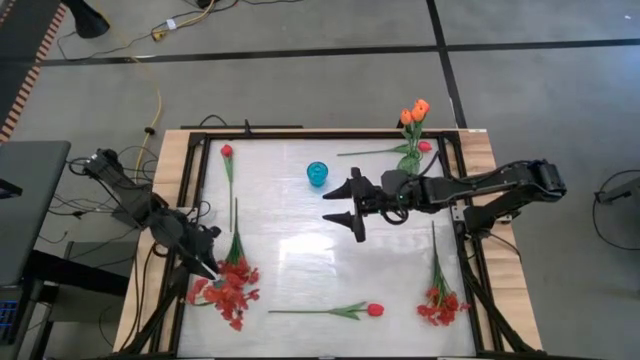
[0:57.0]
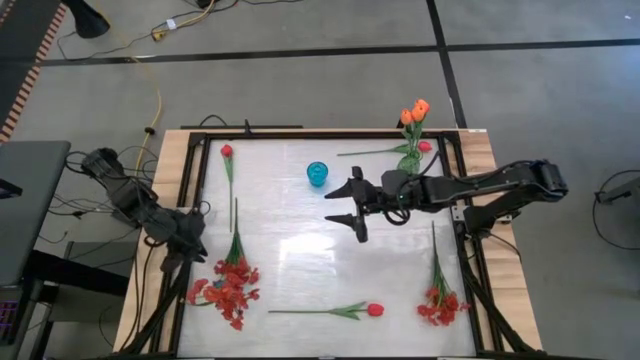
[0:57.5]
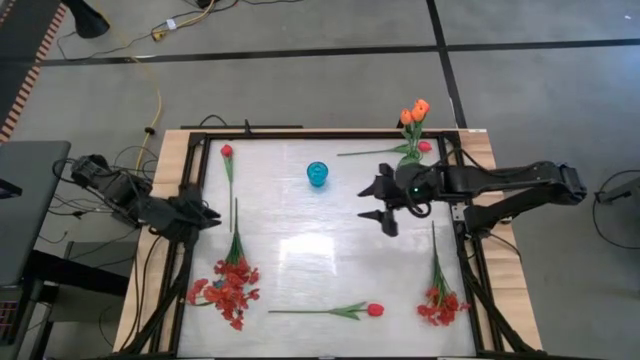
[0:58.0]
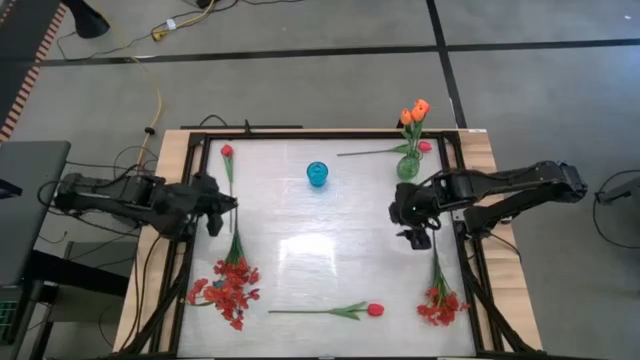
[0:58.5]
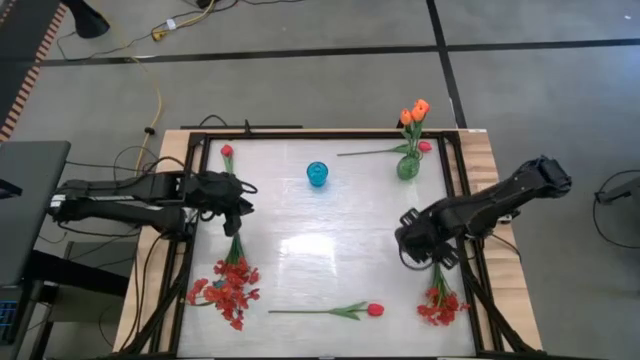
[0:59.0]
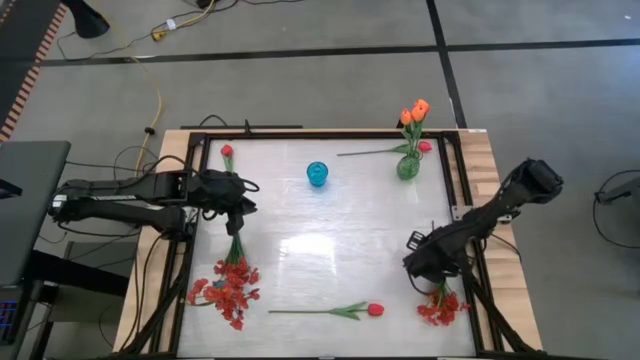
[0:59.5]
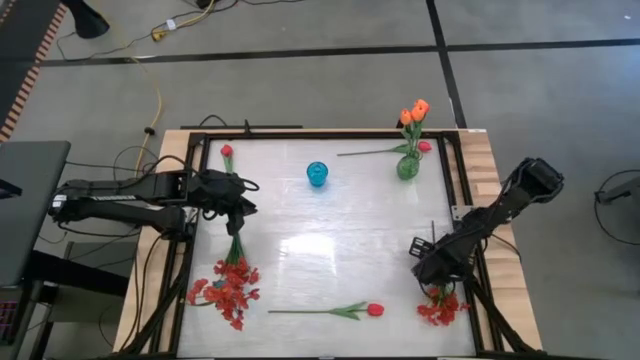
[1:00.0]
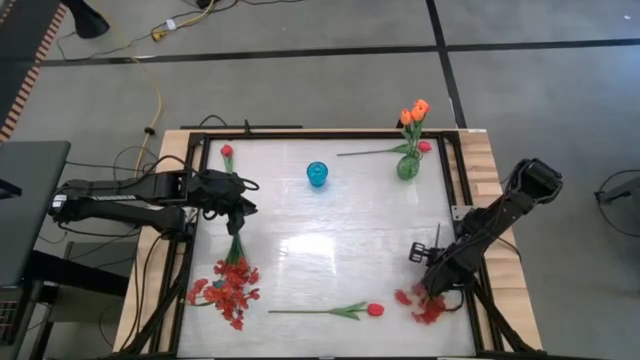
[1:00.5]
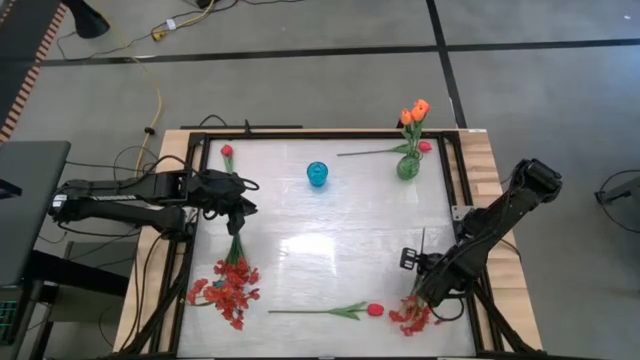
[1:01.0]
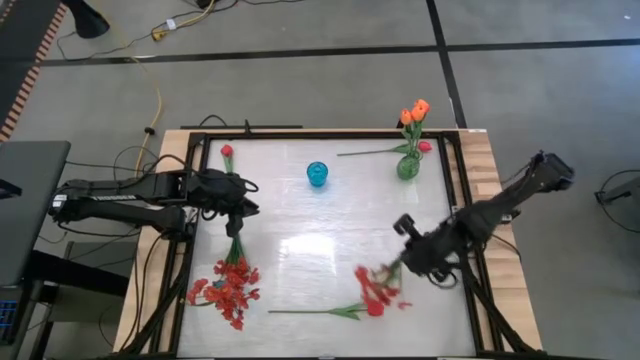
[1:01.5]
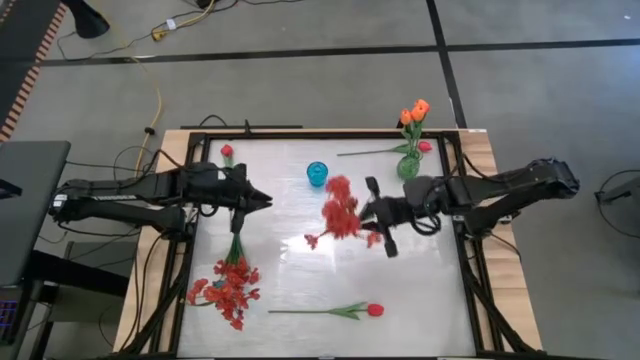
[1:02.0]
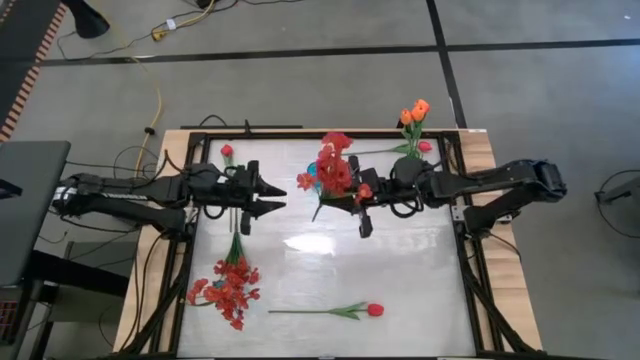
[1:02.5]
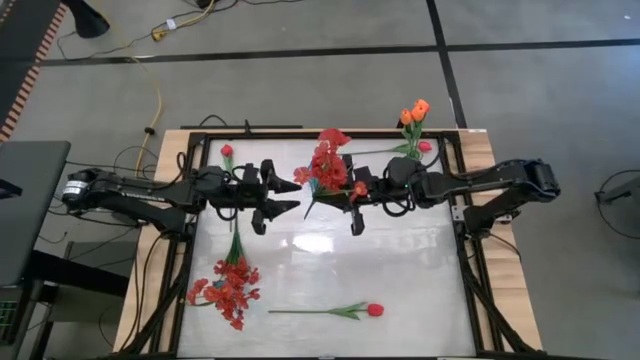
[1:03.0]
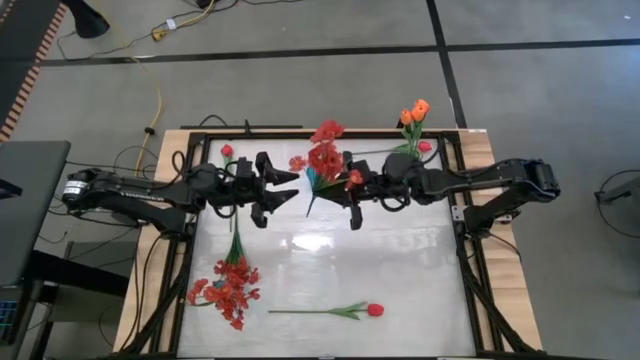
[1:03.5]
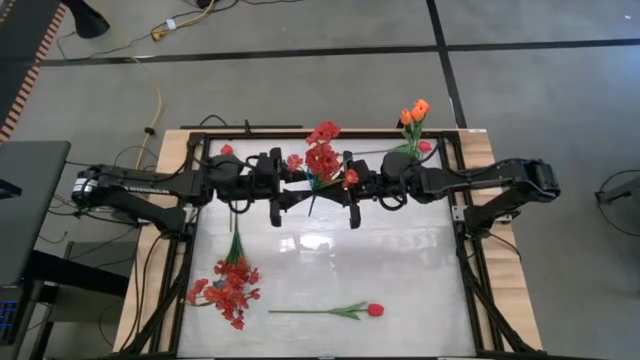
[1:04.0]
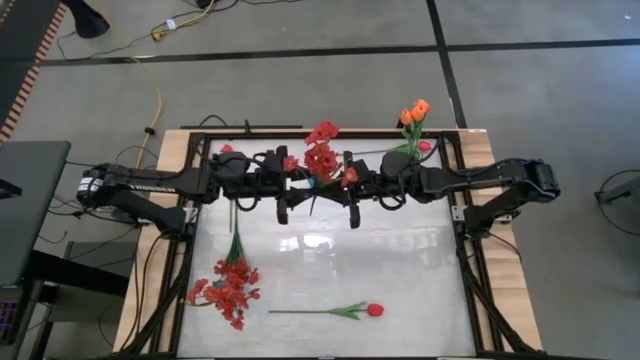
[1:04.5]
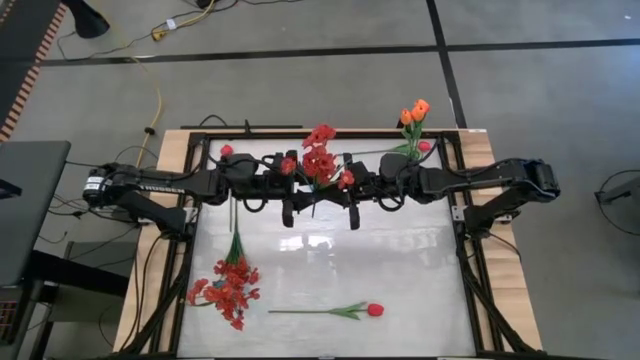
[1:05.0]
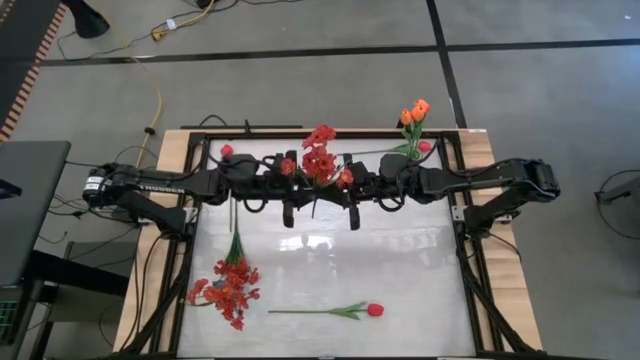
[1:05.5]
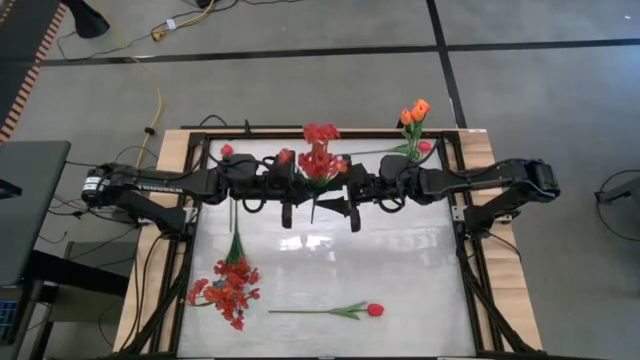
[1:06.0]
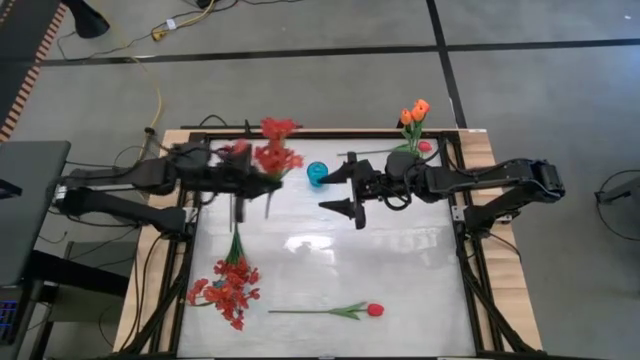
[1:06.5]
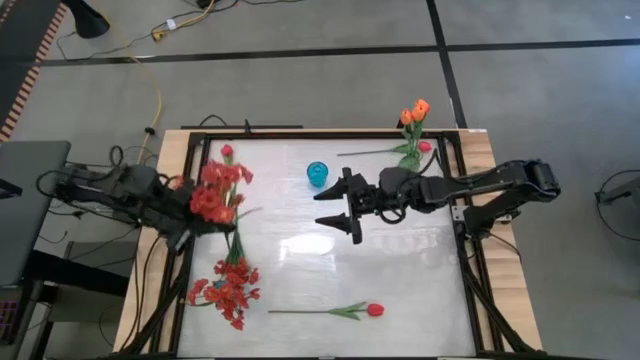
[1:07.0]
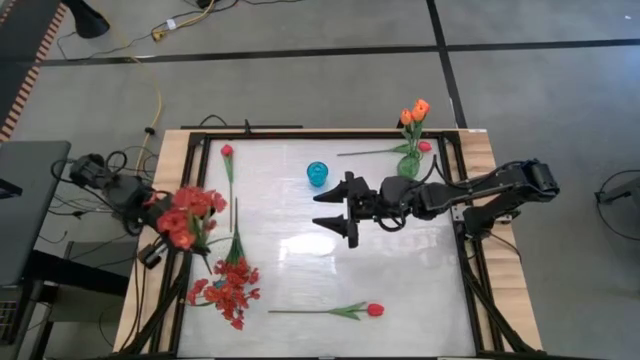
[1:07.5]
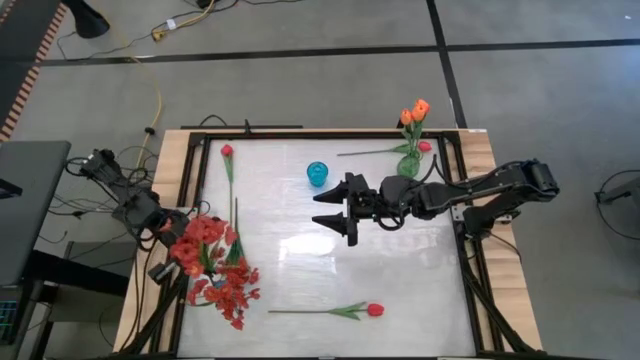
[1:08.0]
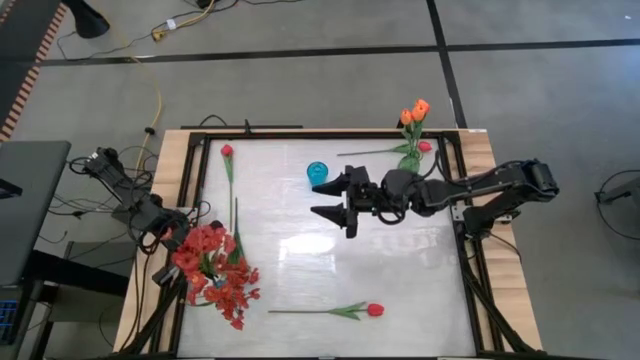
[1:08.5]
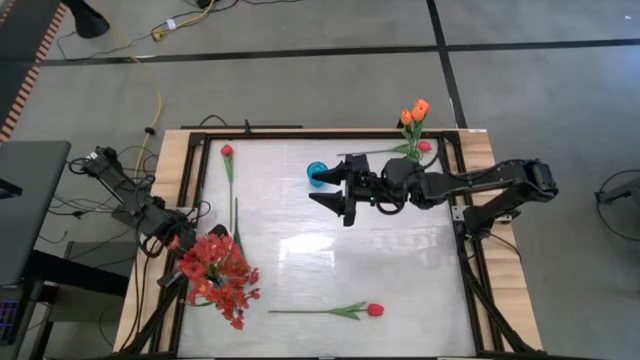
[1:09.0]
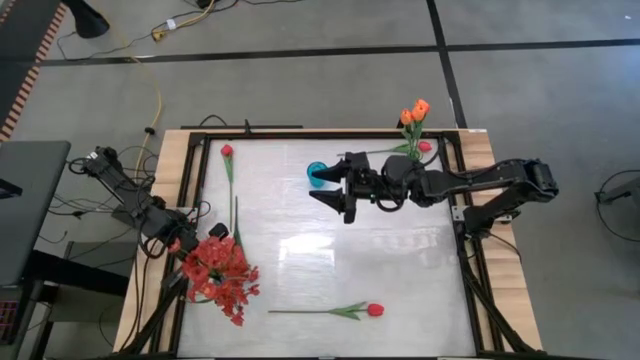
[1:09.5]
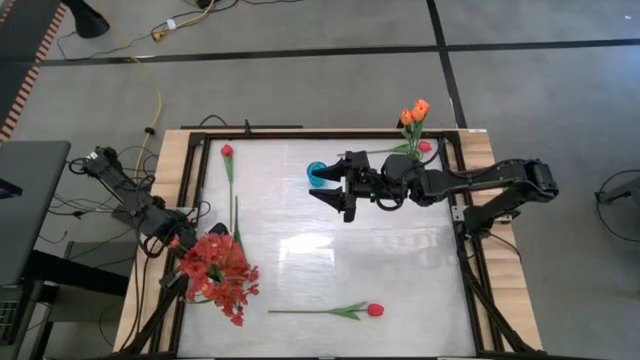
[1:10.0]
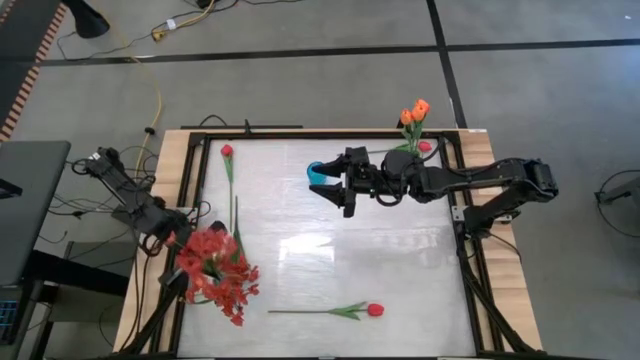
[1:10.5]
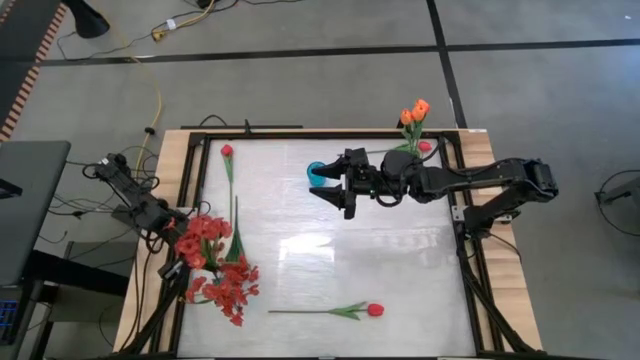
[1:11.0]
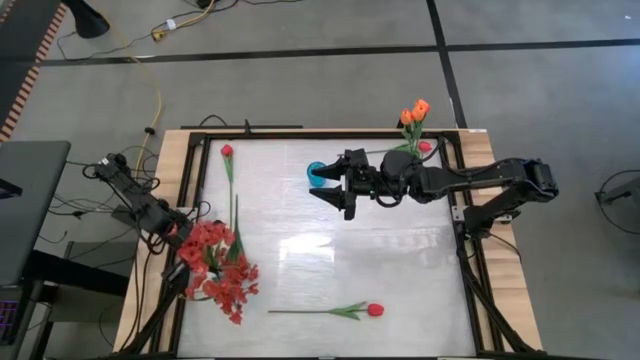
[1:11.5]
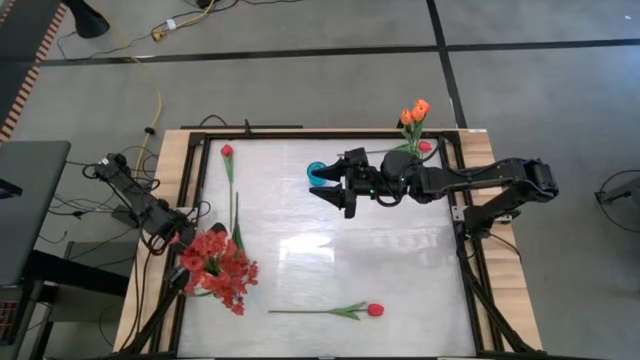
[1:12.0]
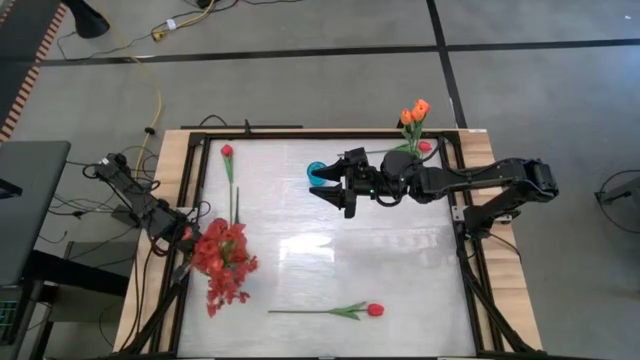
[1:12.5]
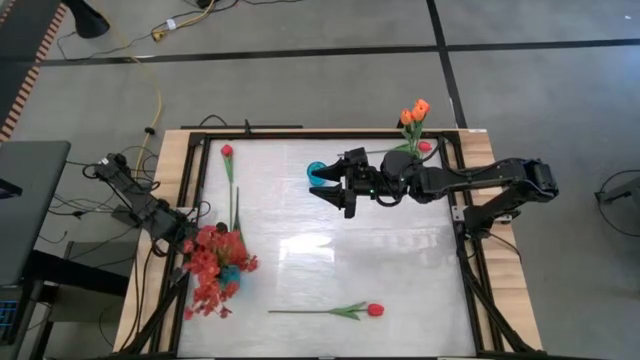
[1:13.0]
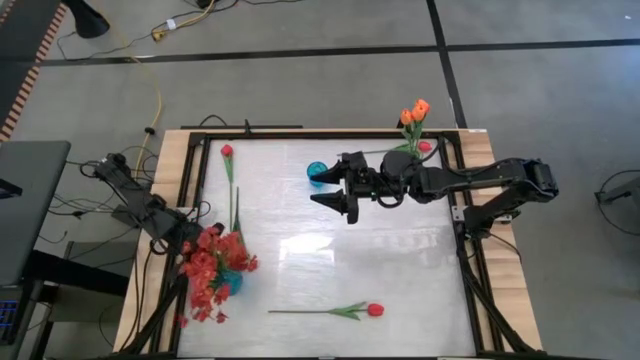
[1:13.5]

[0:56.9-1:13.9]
Task: Sort flowers into vase by color
Put the right red flowers into the bottom blue vase

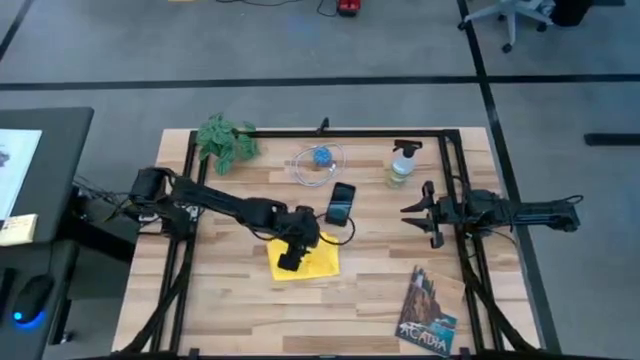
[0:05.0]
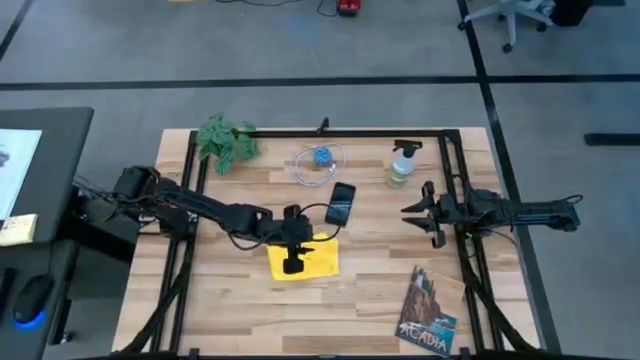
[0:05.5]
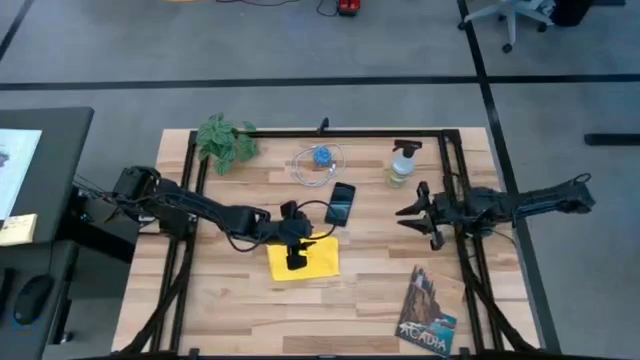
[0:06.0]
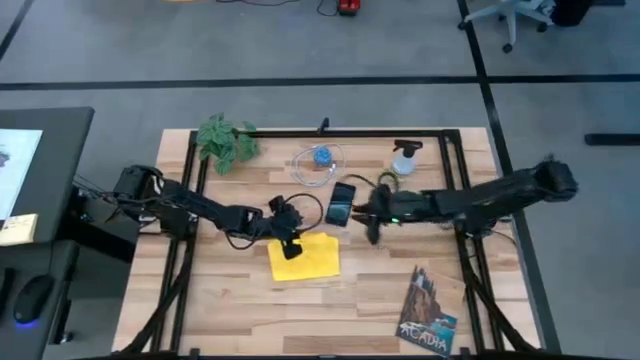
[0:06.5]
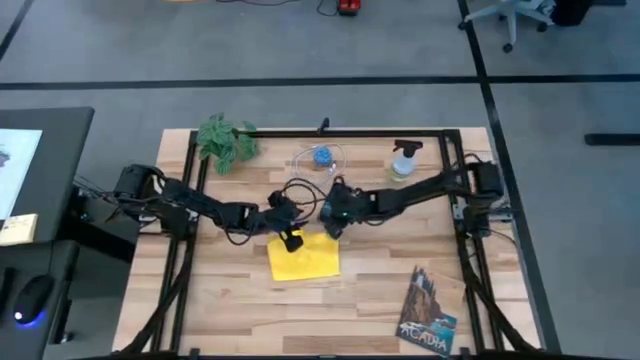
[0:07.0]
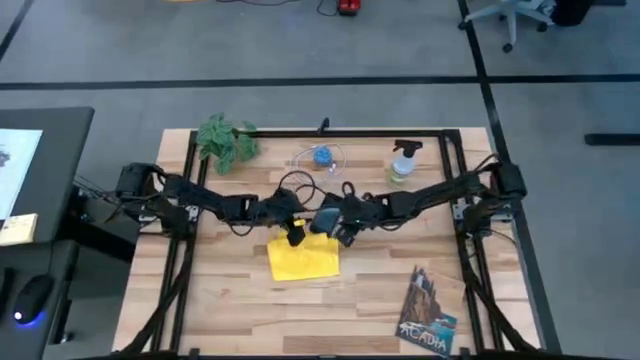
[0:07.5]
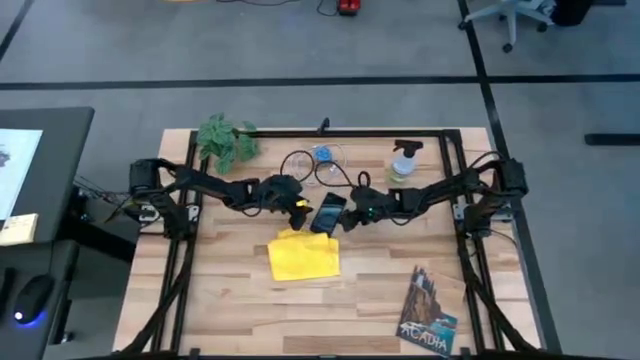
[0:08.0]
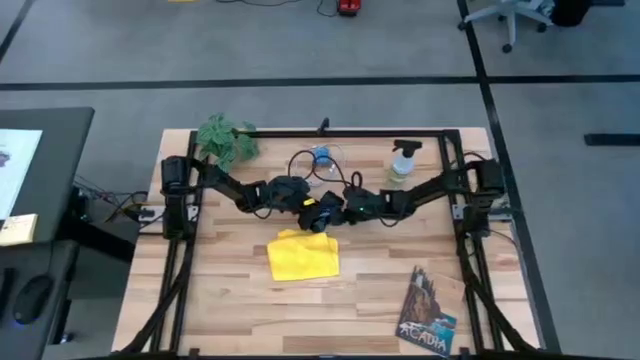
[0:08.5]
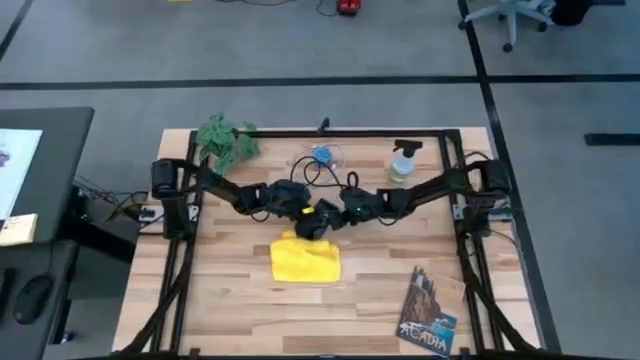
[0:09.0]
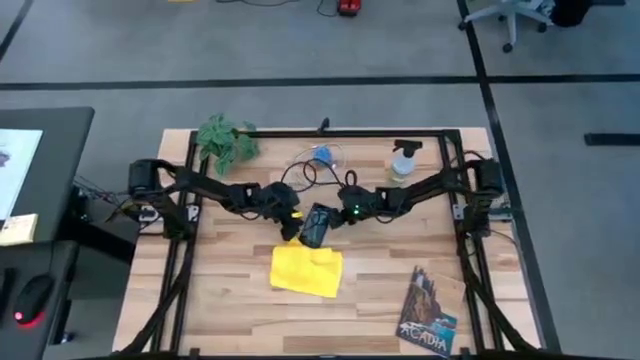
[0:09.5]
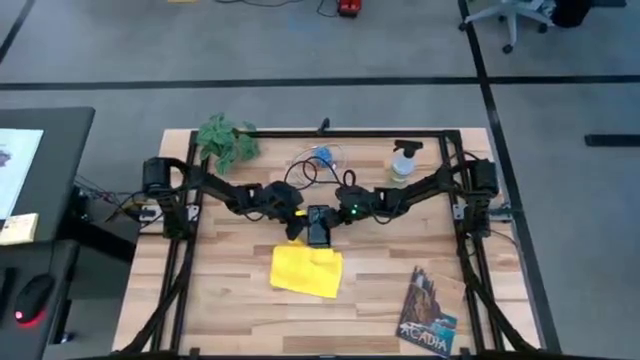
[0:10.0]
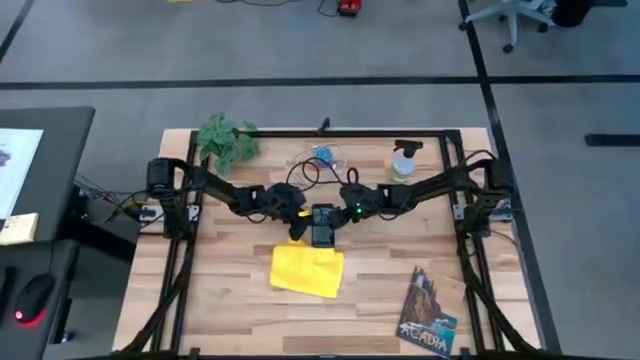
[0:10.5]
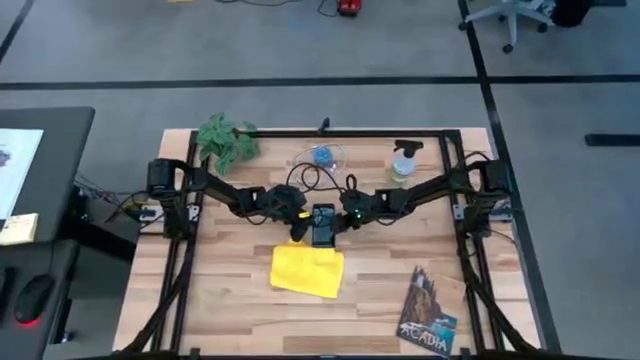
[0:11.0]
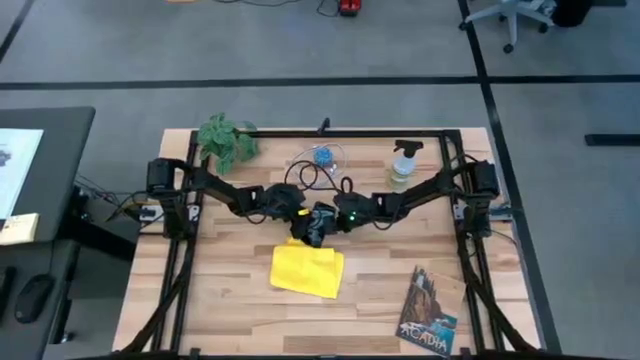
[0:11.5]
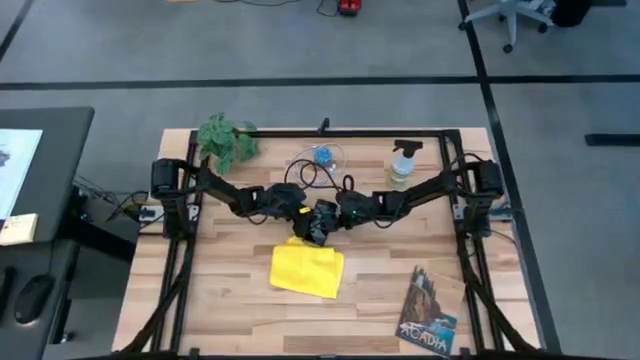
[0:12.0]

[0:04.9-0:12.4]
Task: Apply microfiber cloth
Spray the cellphone with the cleaning bottle
